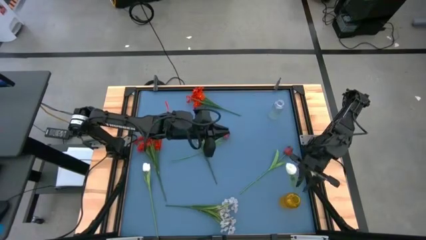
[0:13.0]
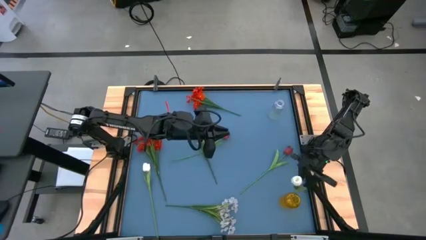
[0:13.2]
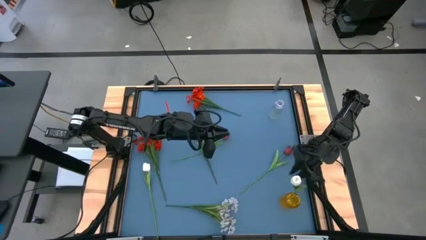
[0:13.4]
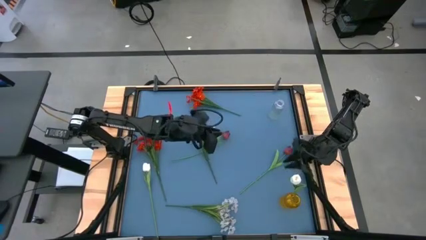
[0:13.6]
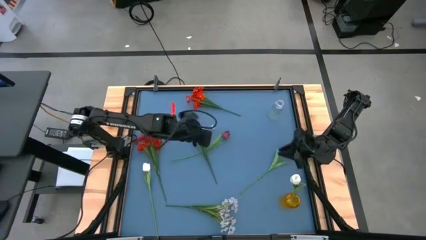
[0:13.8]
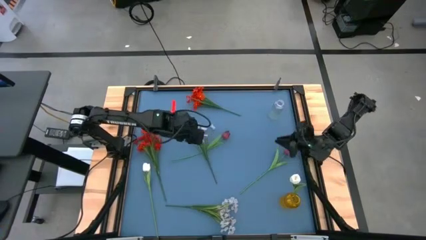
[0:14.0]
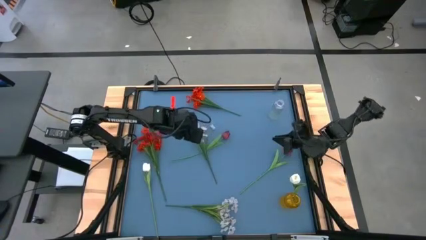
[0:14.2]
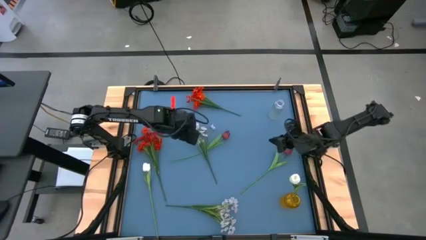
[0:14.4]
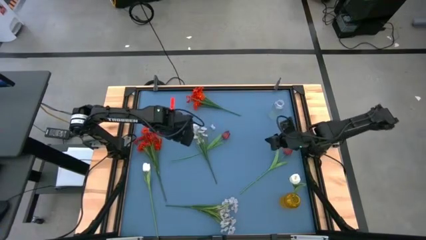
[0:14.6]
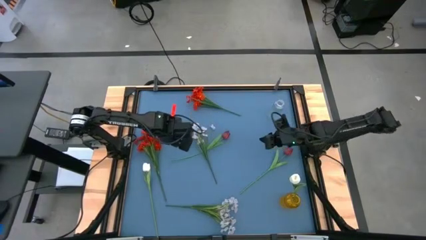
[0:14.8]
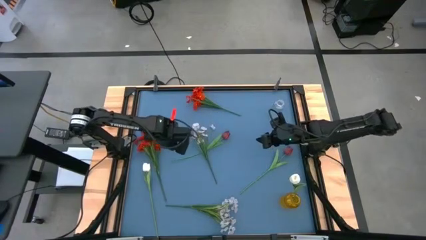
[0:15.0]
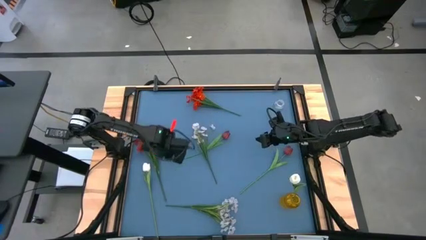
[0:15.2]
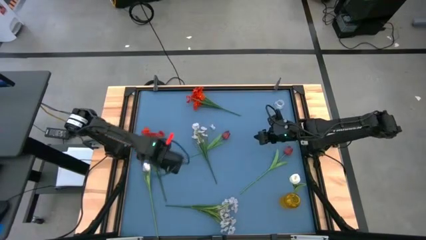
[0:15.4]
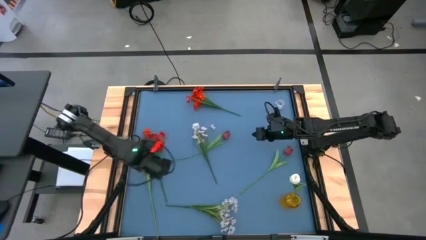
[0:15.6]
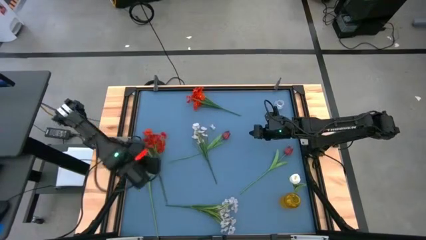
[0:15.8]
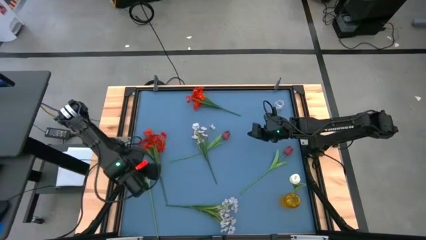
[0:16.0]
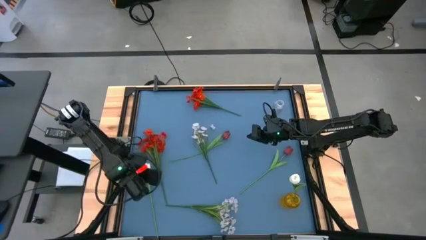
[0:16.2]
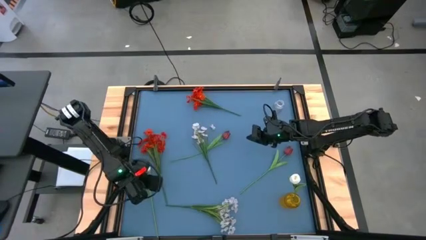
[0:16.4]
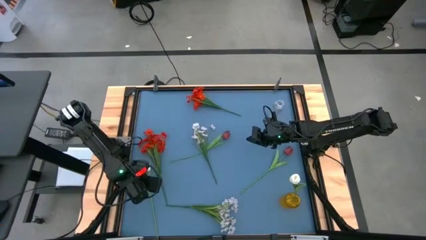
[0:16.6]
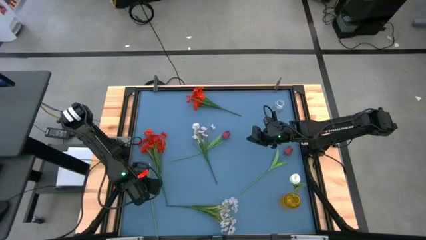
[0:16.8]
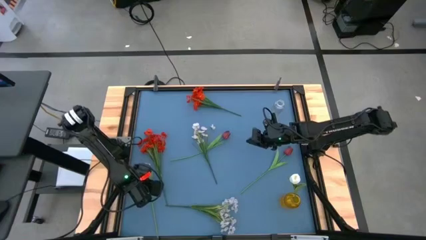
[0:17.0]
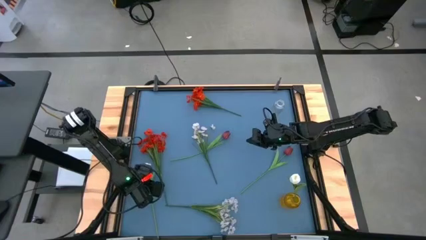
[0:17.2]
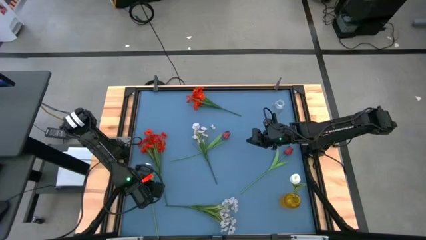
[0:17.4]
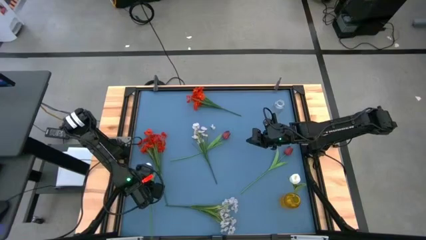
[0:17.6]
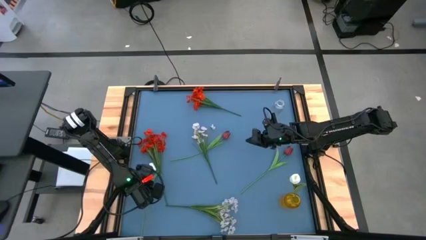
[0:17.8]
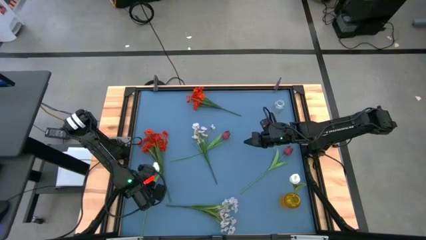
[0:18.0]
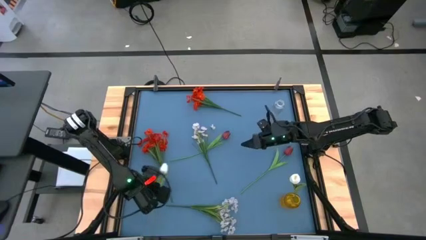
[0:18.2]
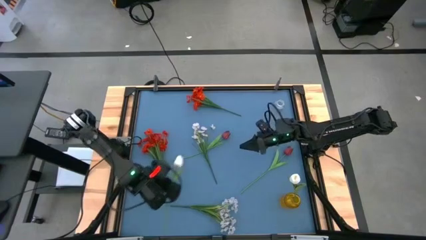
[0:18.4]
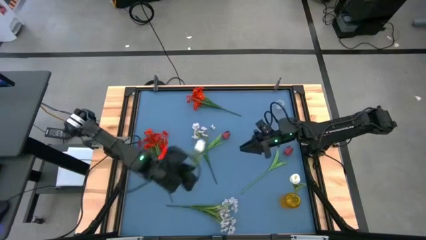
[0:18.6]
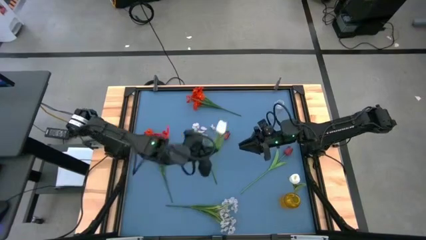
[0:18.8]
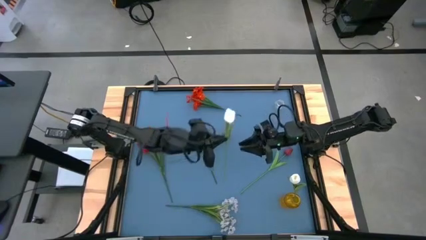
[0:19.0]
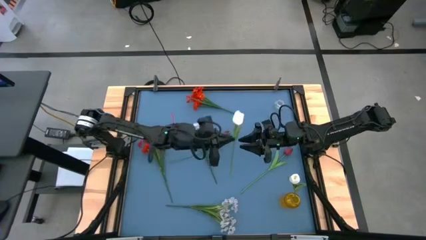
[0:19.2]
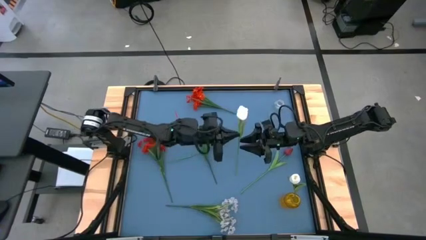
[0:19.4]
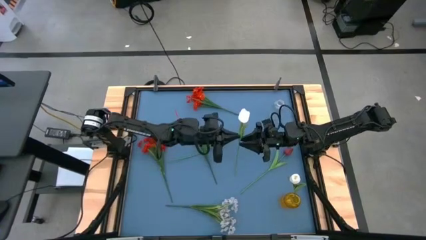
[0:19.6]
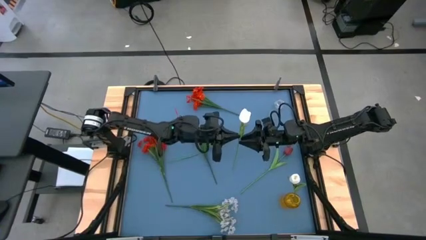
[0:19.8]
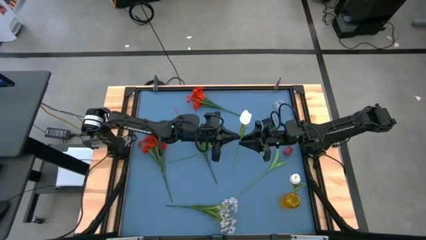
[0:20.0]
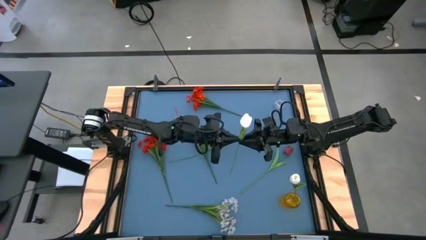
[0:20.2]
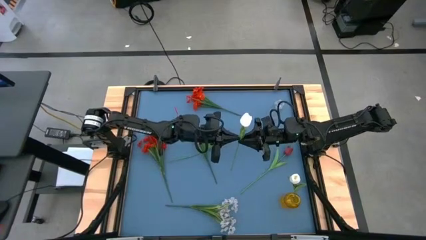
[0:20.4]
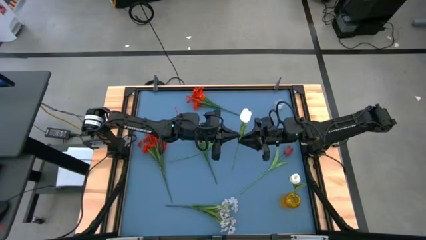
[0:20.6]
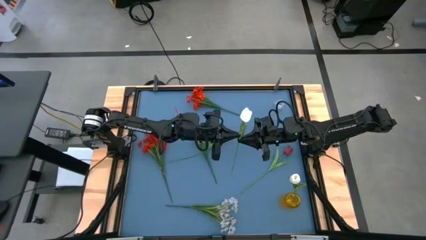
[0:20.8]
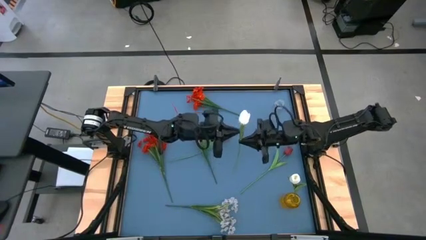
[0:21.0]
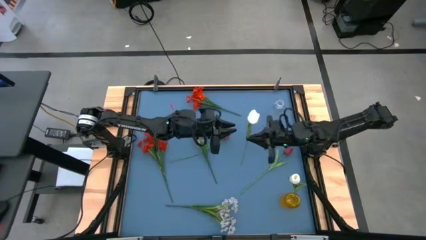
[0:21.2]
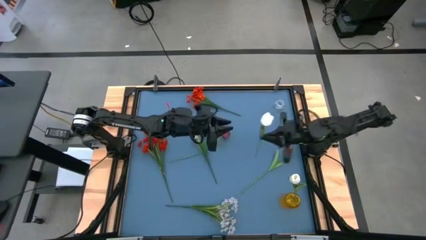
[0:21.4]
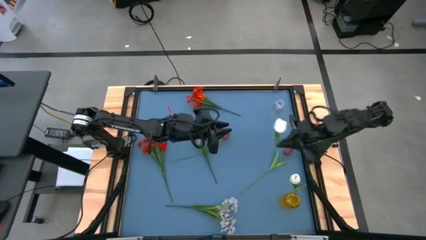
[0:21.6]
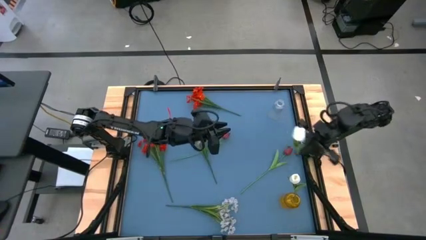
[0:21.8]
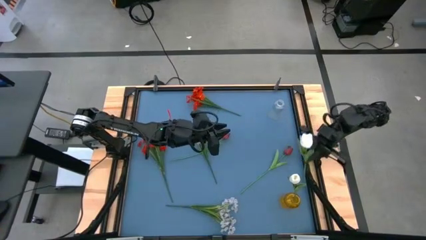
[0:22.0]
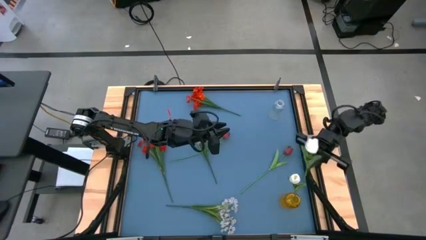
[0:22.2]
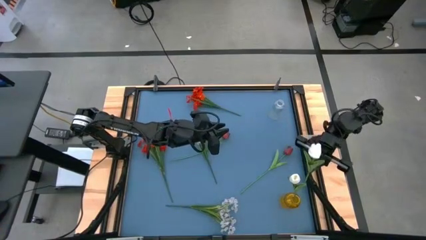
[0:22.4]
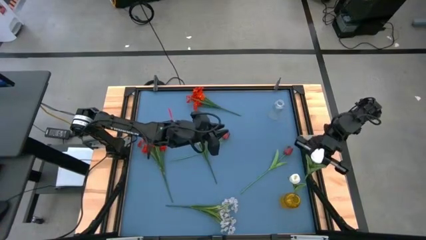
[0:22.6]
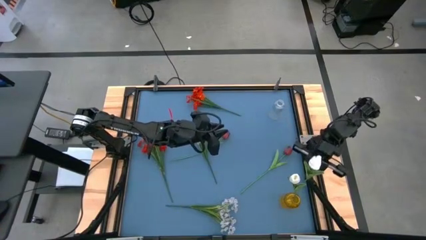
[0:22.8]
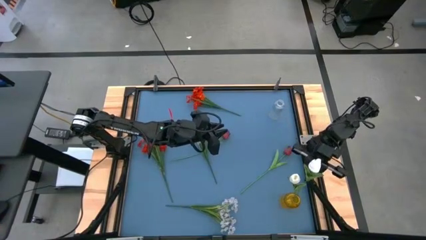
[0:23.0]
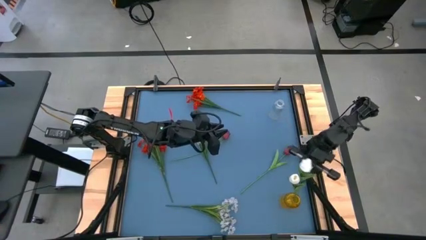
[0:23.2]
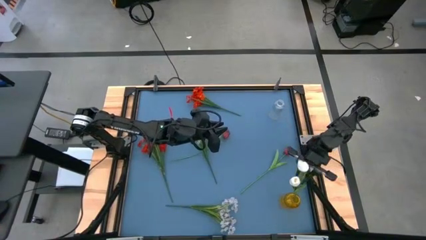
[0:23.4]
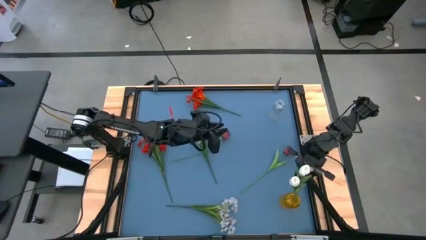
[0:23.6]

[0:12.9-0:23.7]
Task: Sort flowers into vase by color
Put the white flower into the yellow vase

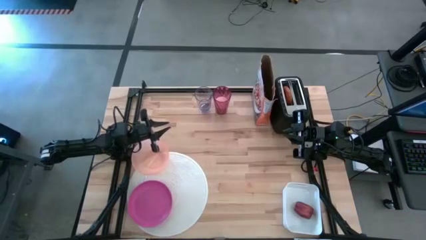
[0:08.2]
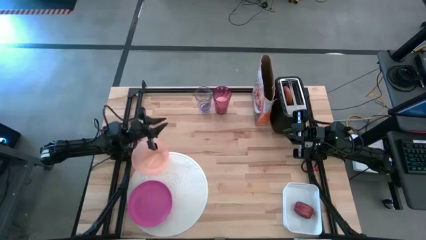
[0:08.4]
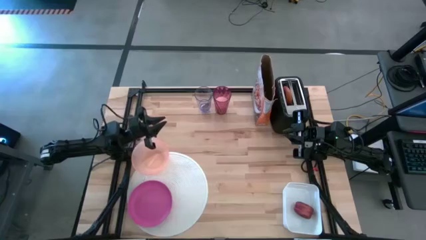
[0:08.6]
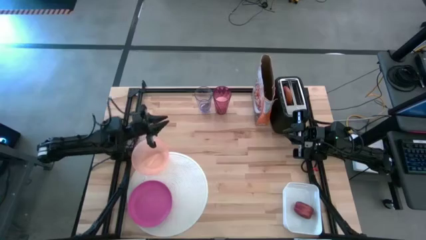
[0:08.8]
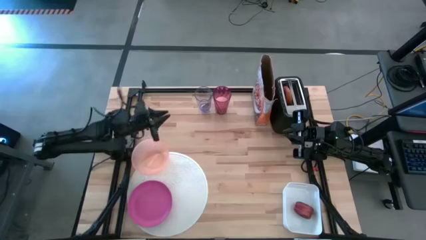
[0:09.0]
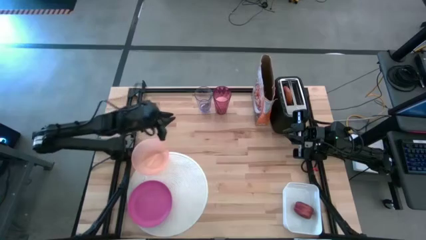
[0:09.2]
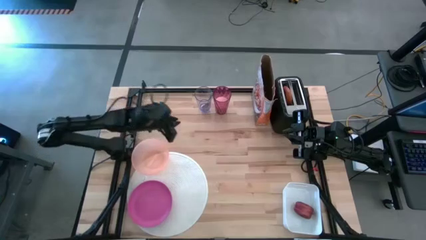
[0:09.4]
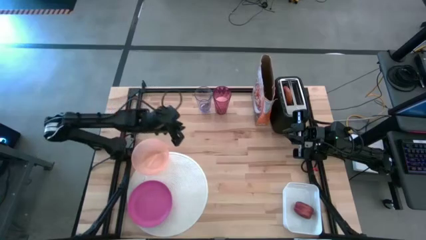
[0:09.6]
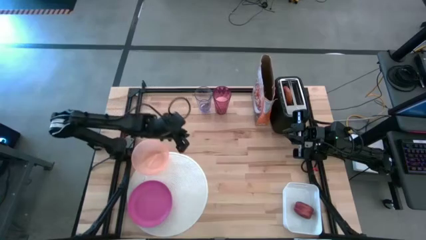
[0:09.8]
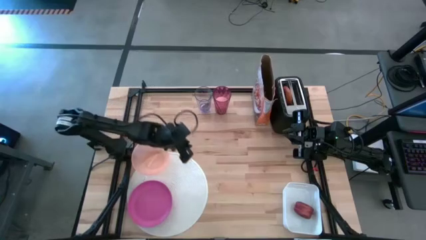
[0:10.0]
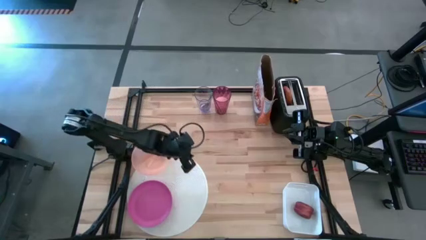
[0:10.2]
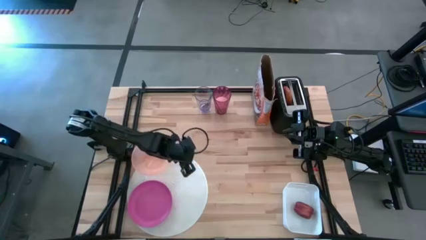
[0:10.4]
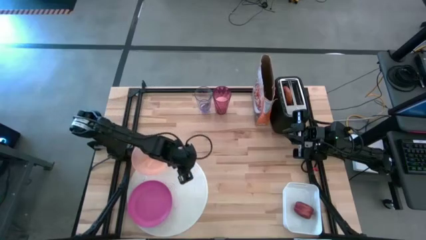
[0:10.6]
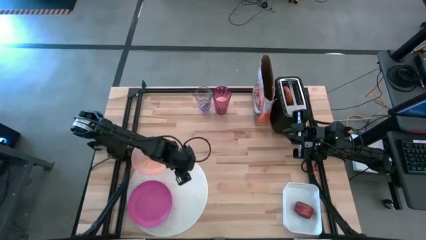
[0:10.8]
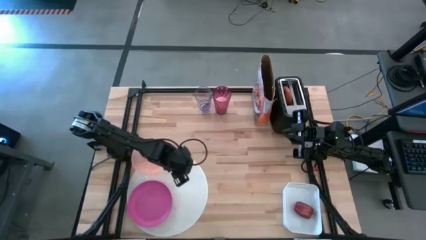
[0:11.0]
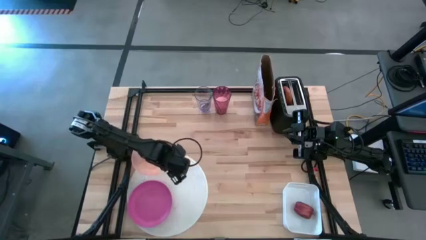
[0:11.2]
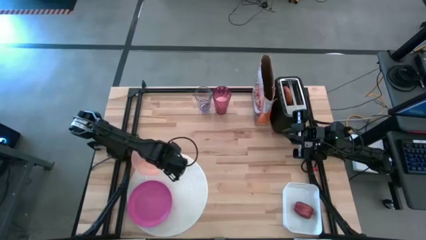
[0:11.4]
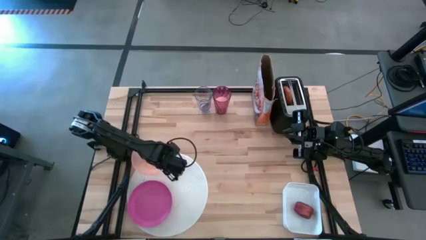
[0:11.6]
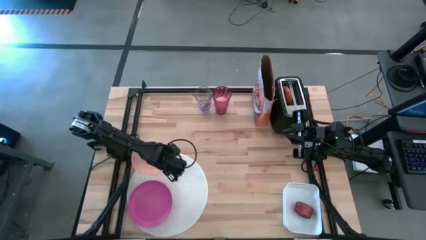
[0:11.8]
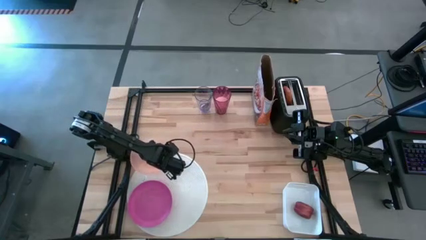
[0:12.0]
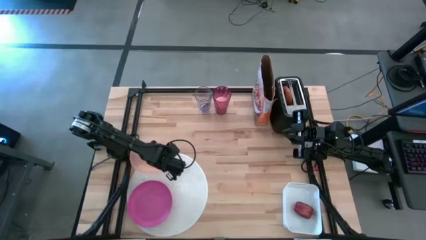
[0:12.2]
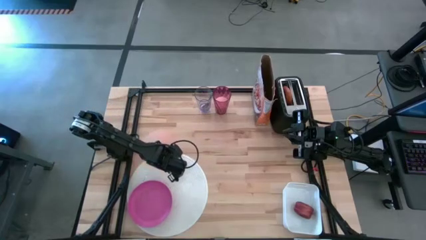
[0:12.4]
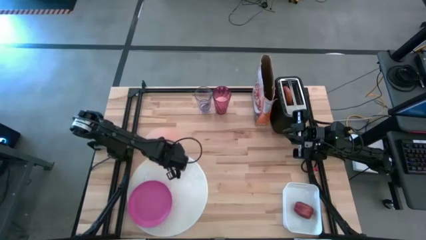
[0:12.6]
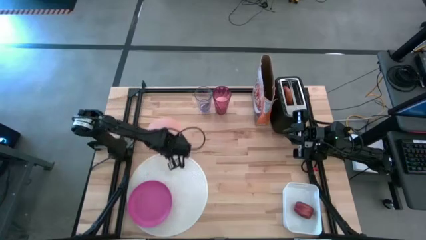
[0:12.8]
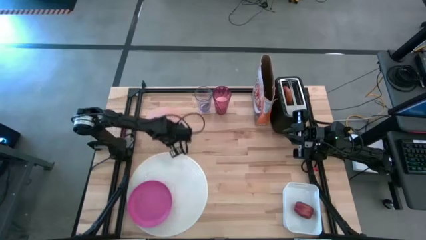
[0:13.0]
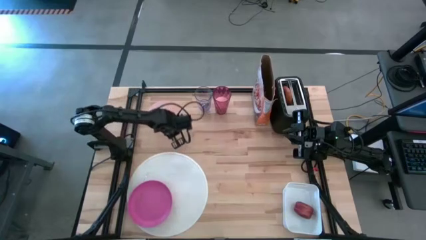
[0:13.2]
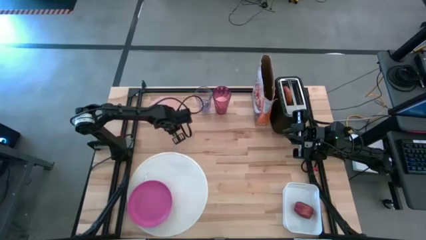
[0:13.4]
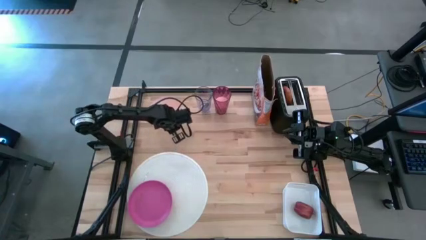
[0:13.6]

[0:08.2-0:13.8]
Task: Arrange a breakfast setting
Remove the orange bowl from the white table mat
